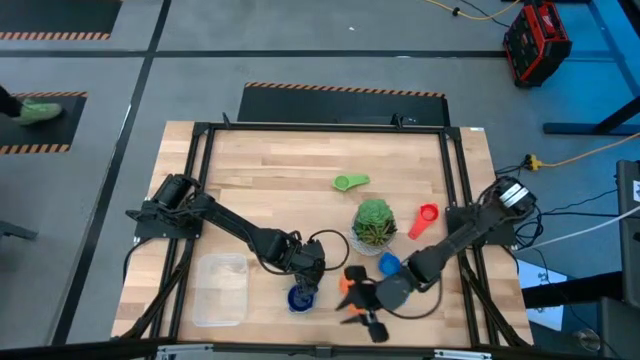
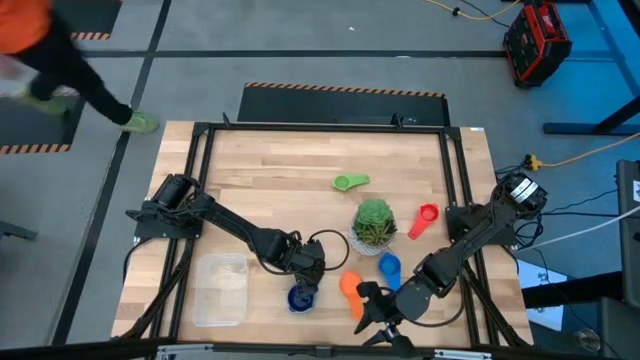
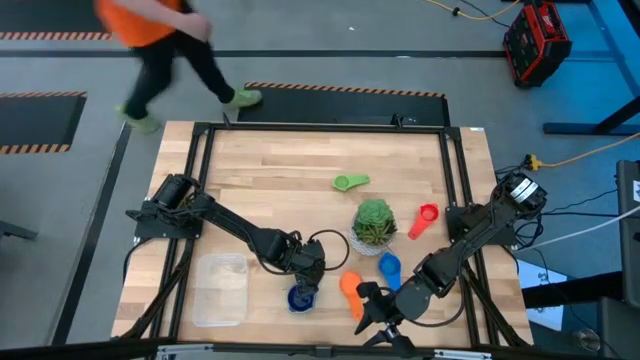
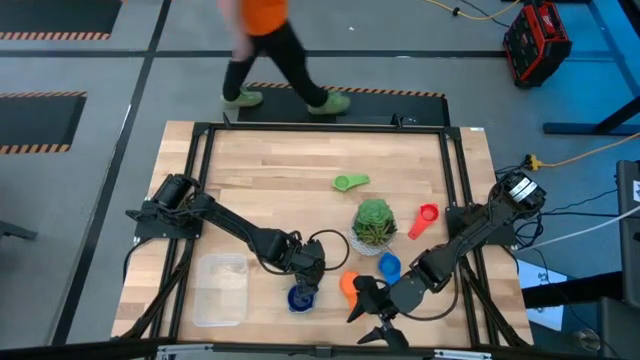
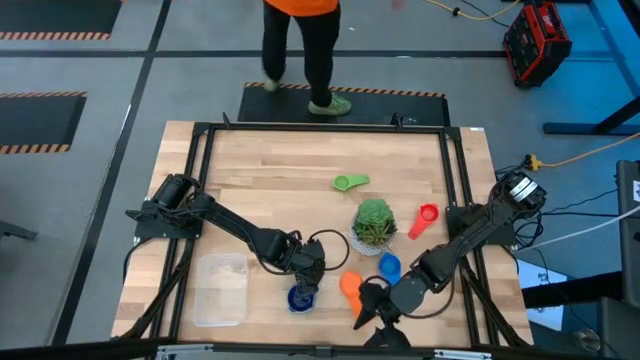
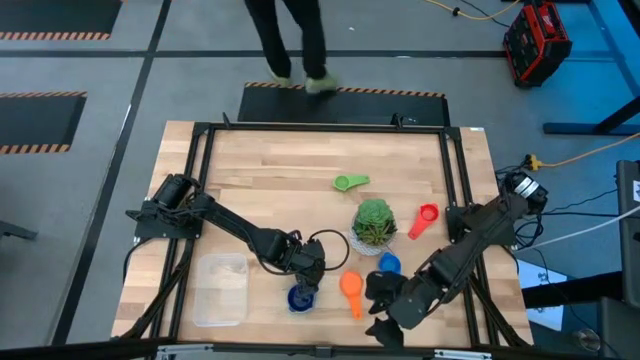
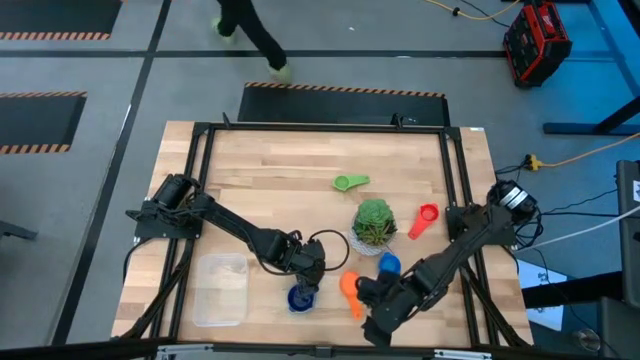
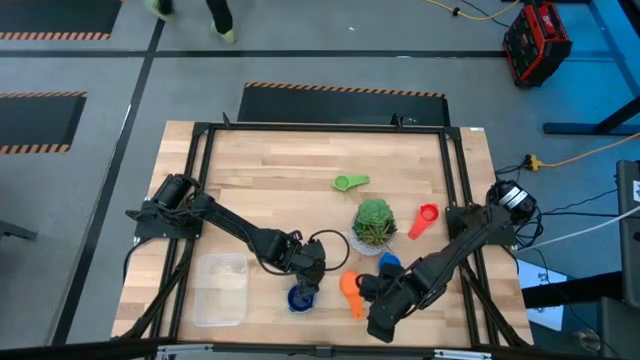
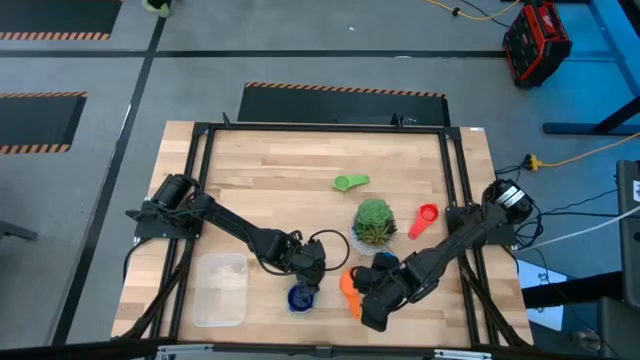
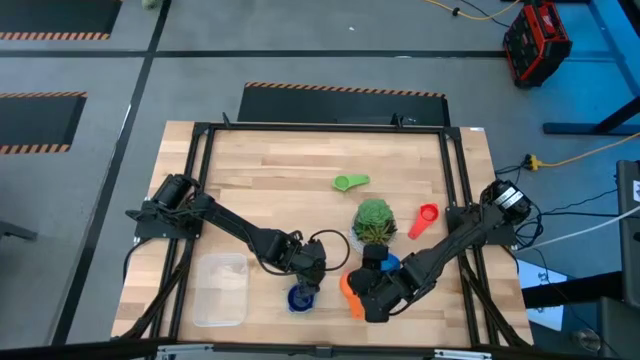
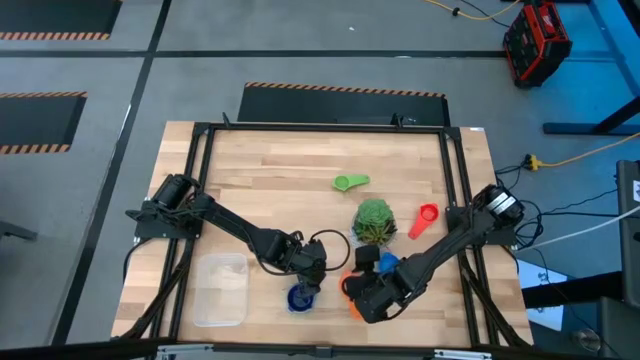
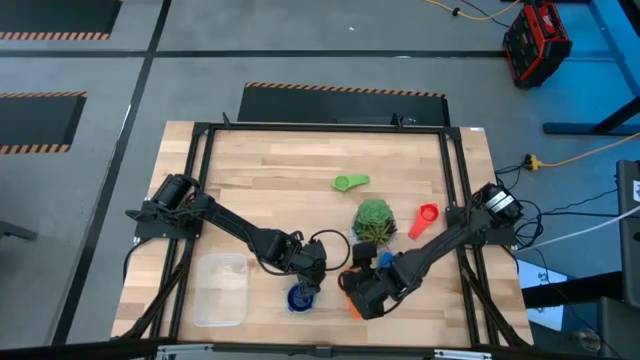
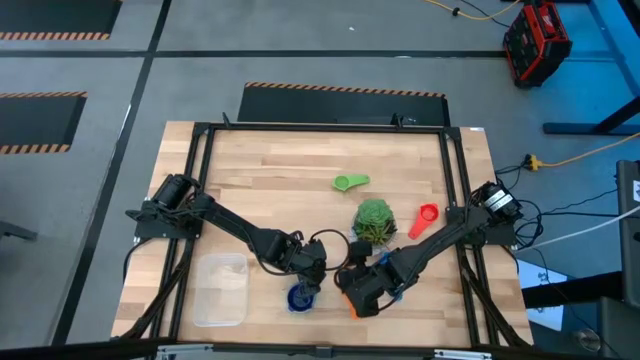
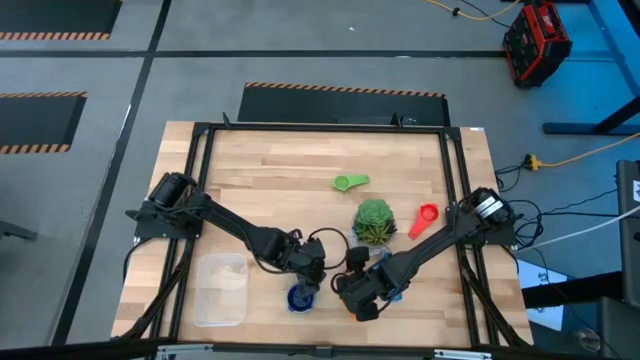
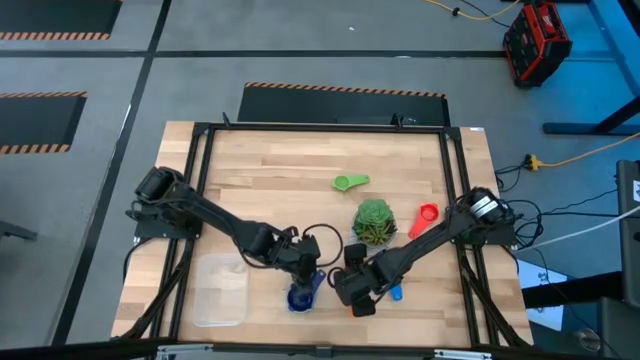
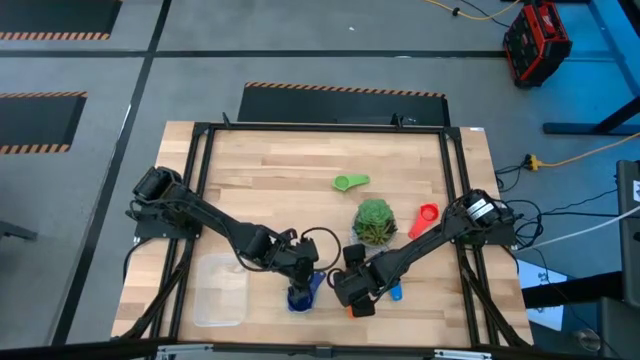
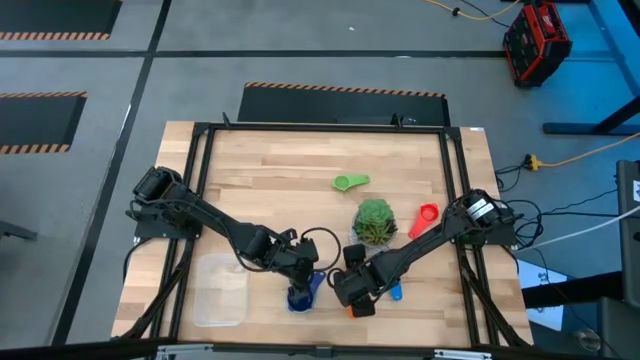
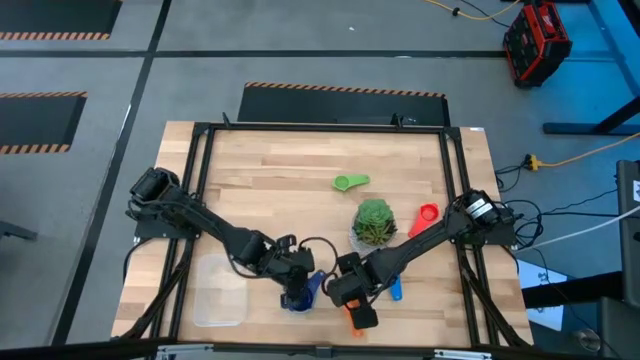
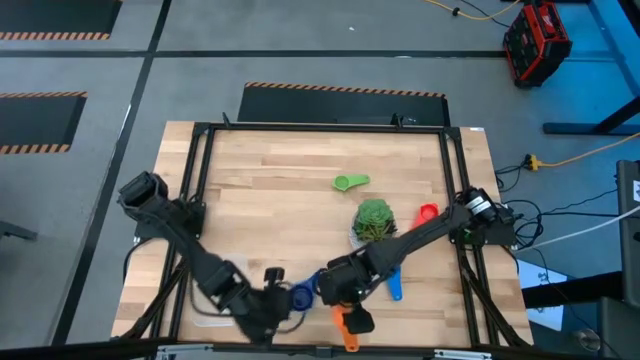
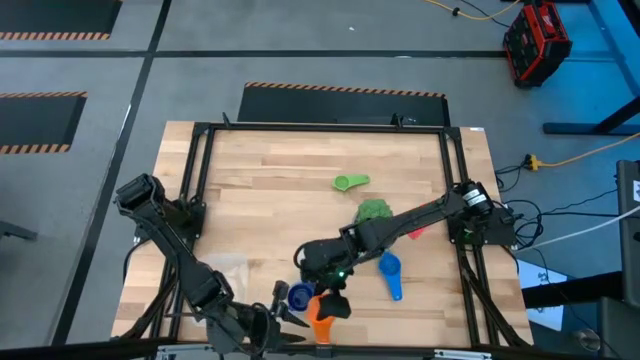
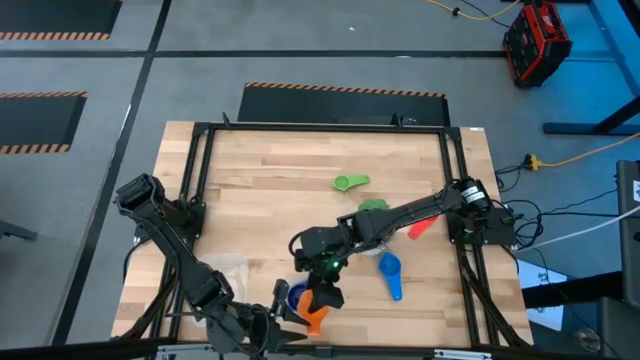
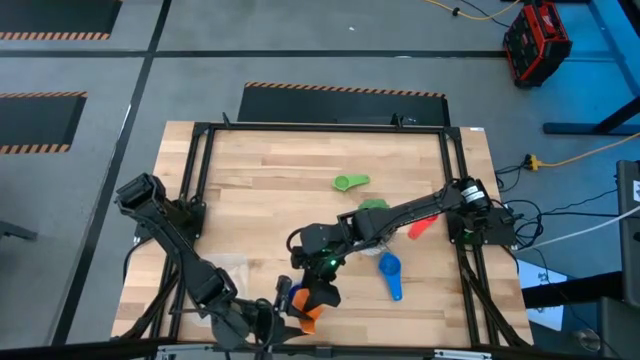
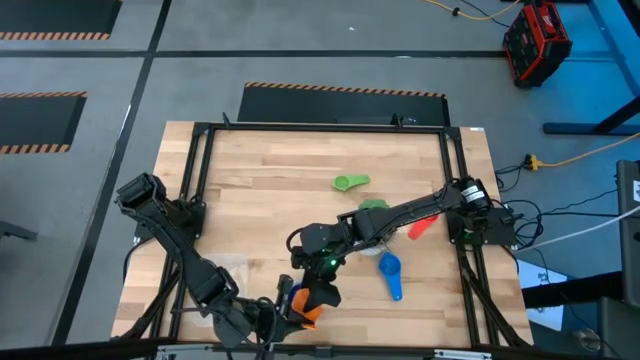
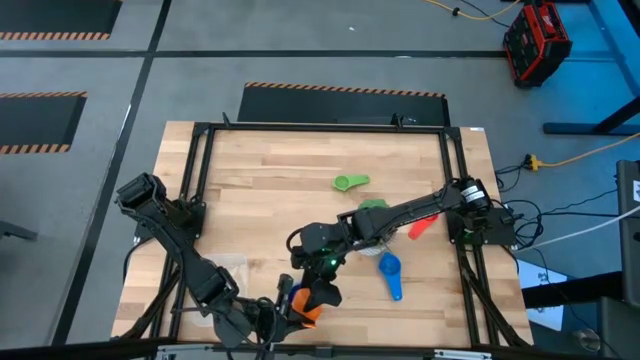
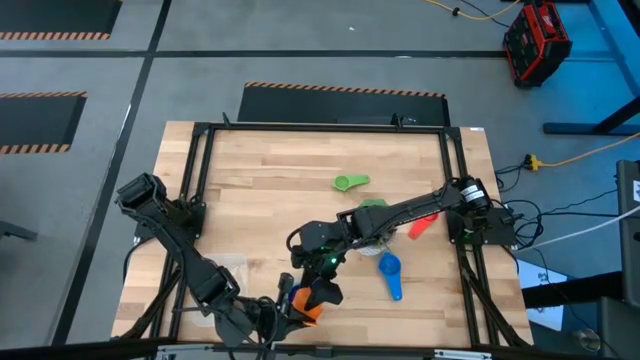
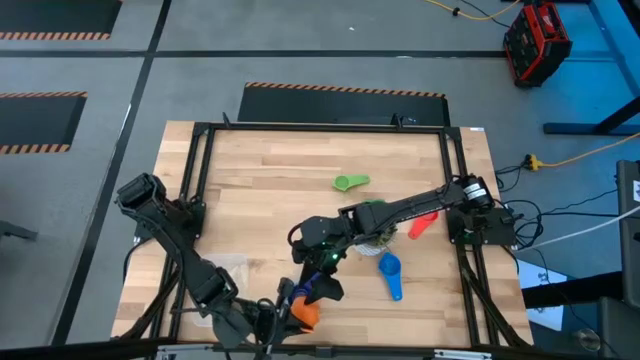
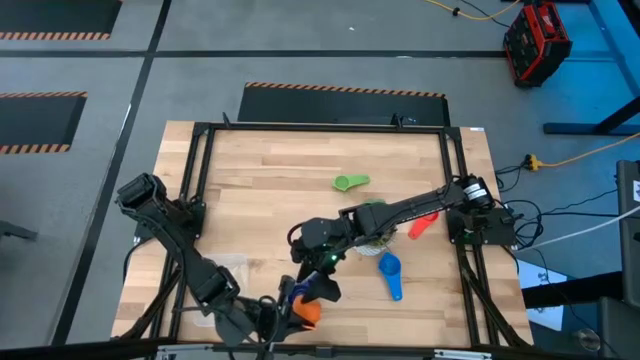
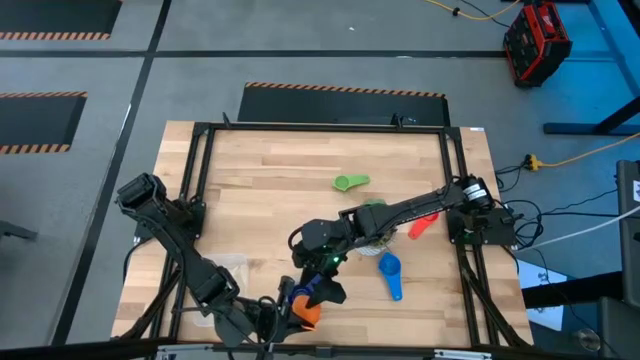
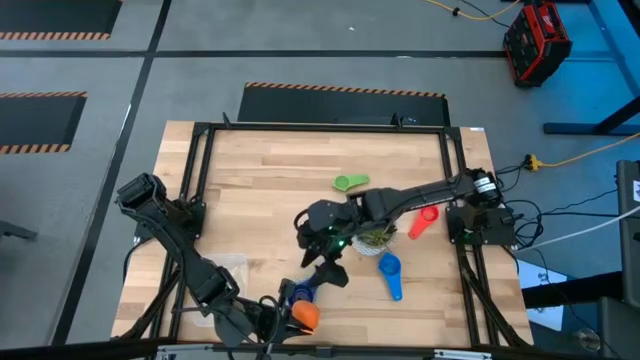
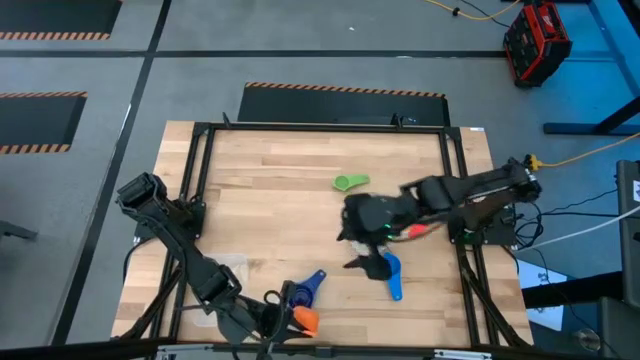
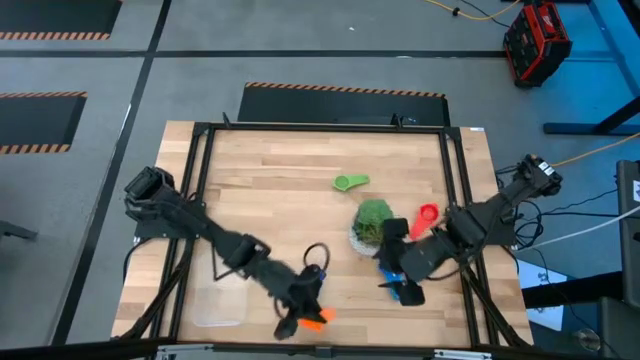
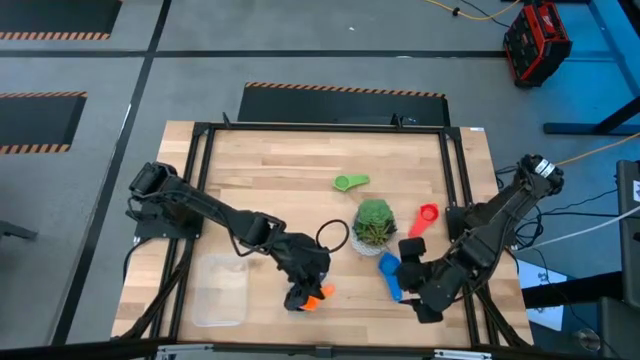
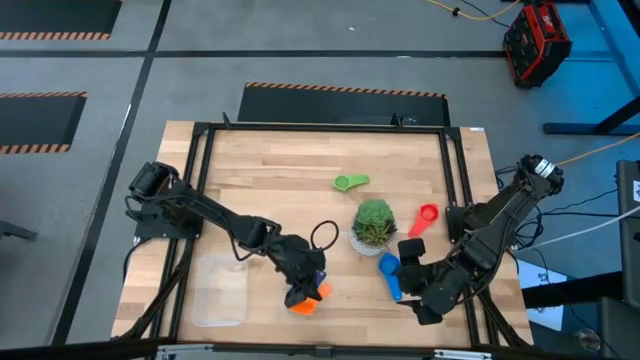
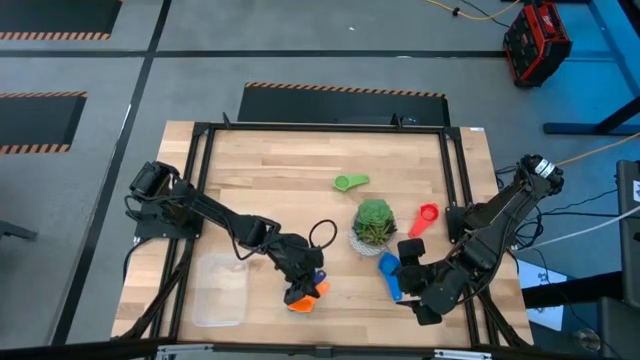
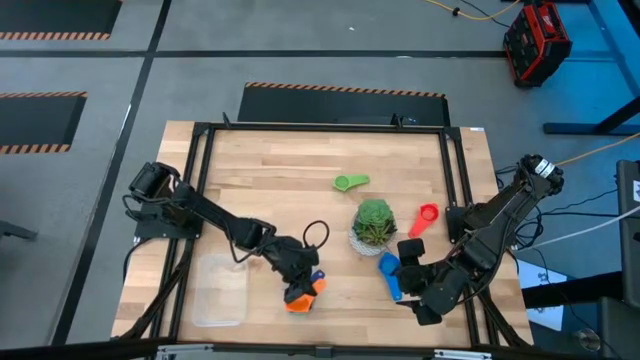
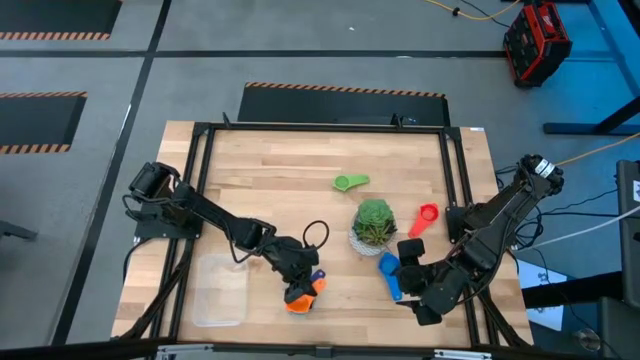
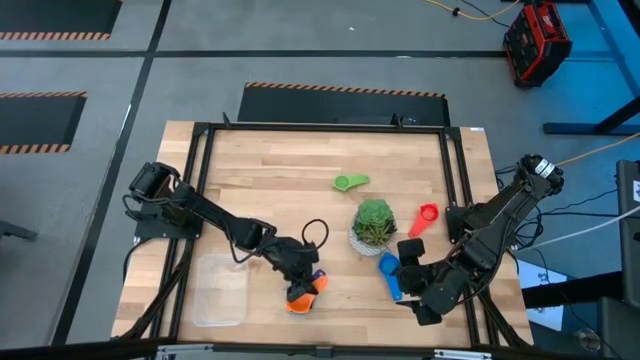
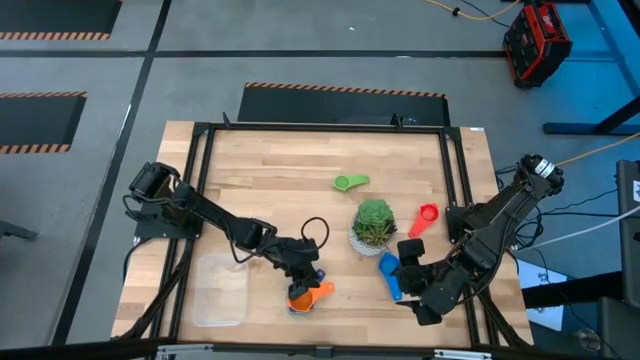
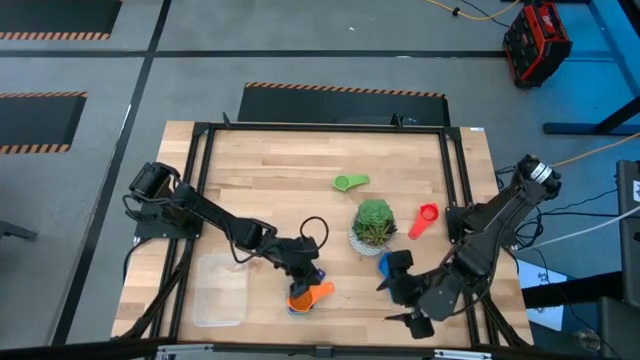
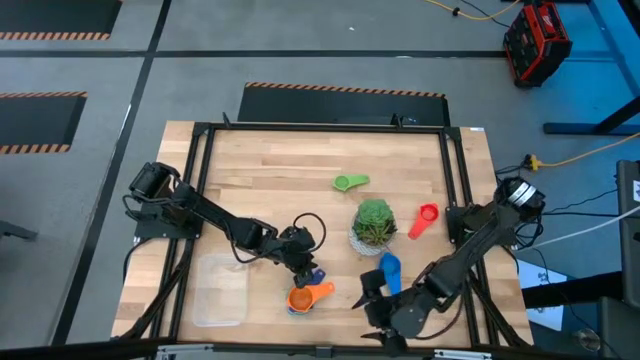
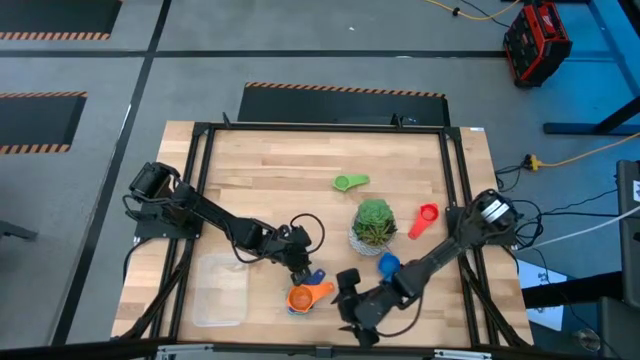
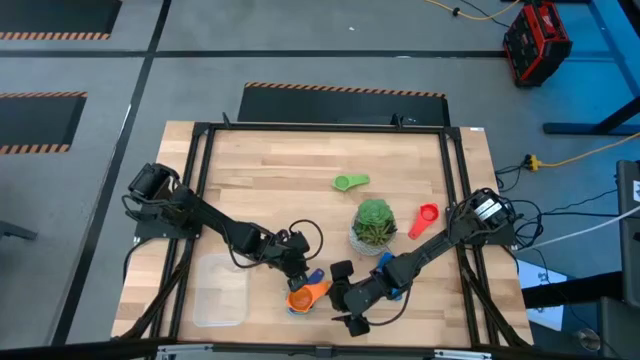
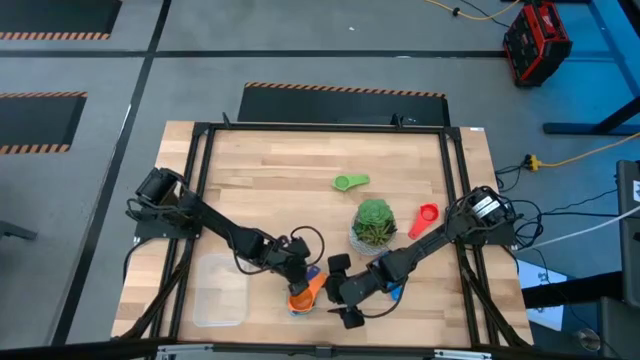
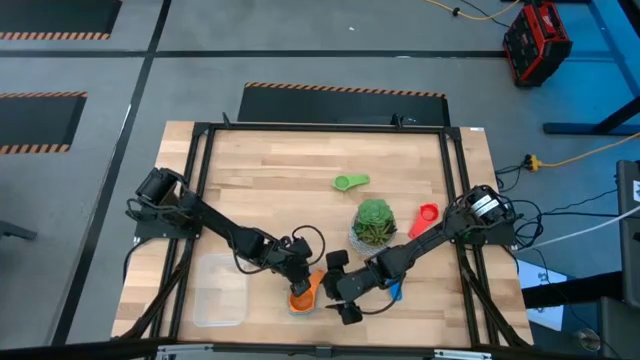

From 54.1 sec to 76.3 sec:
Task: Nest measuring cups in basket
Stack the orange measuring cup on top of the dark blue measuring cup

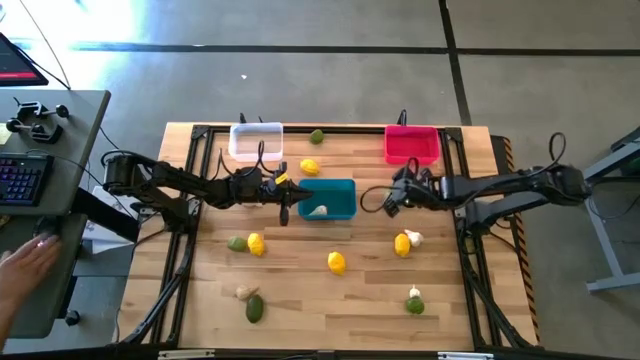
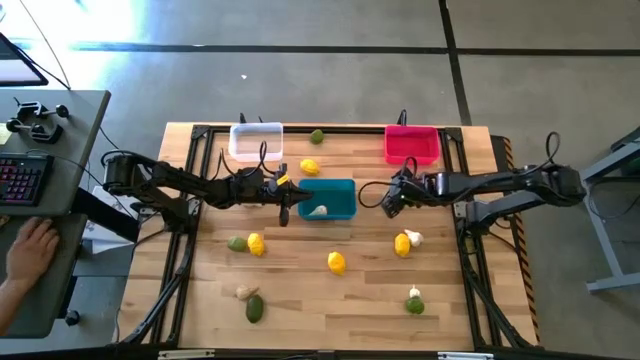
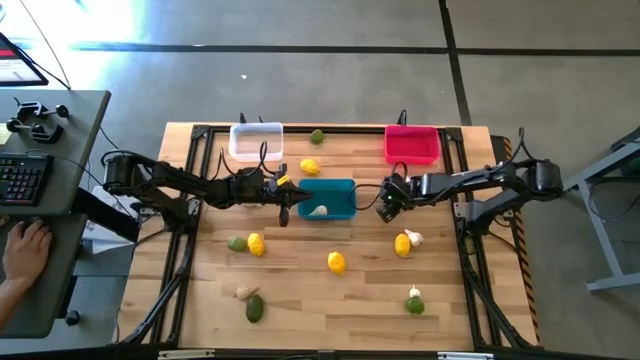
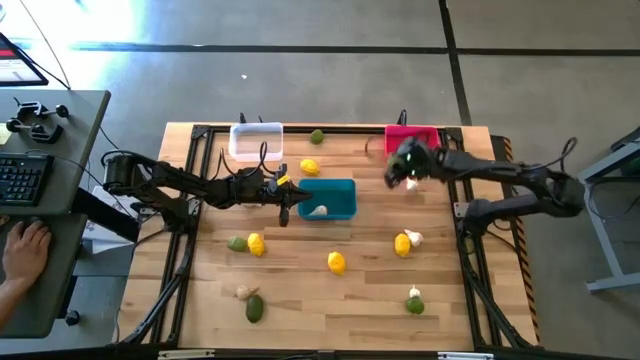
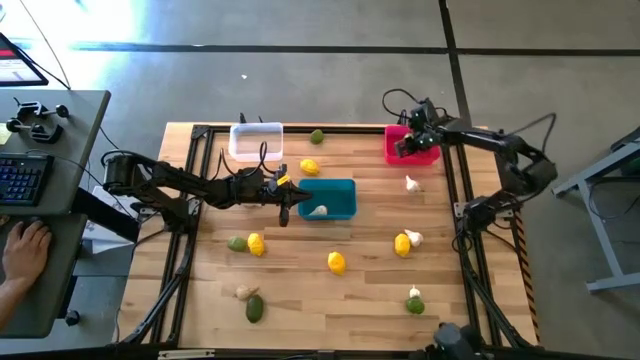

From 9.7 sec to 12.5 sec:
Task: Sort produce into baskets
Put the green lime into the pink bin
